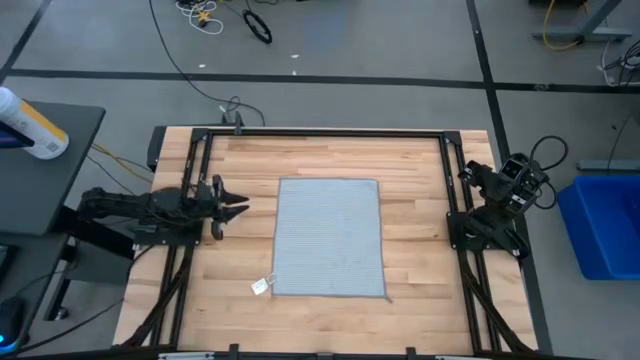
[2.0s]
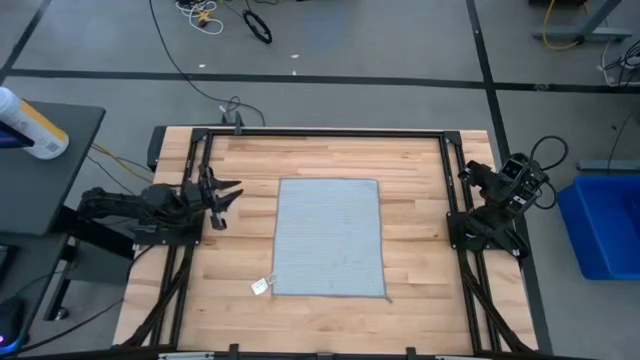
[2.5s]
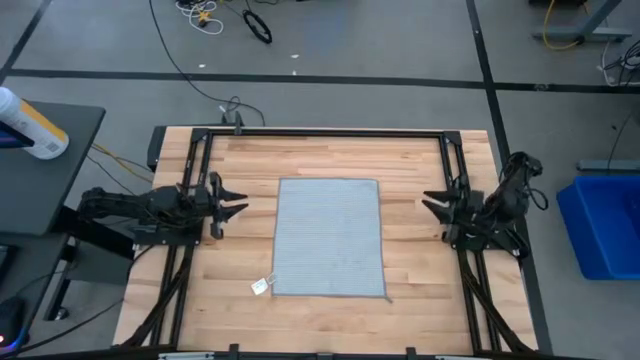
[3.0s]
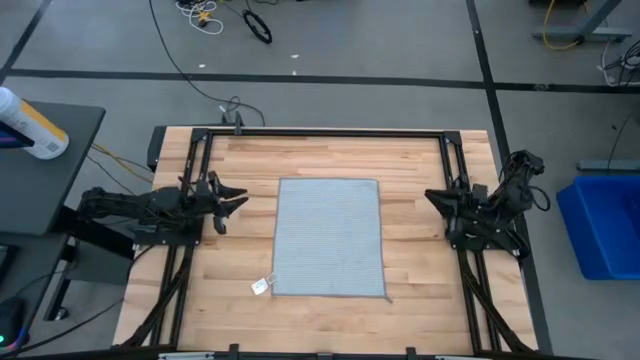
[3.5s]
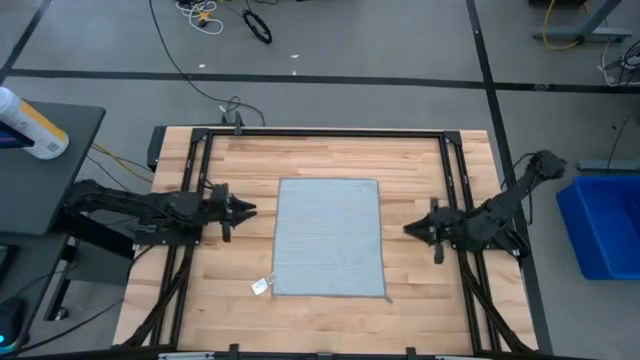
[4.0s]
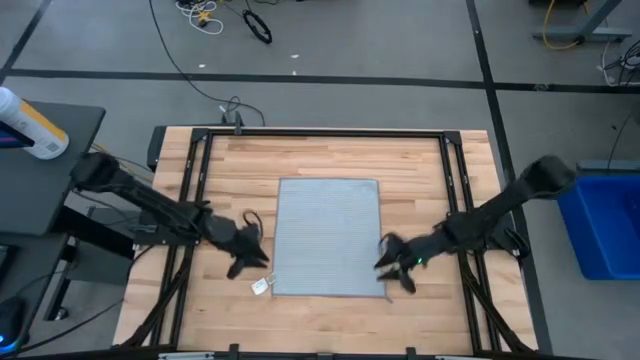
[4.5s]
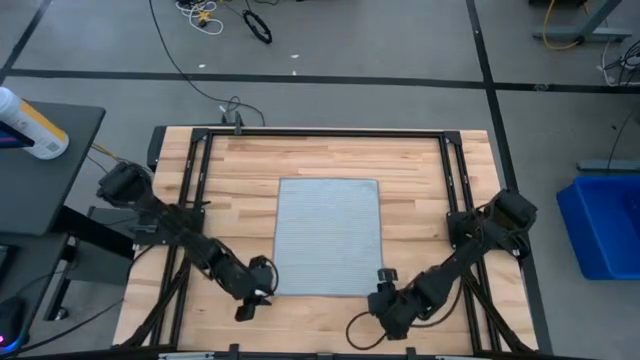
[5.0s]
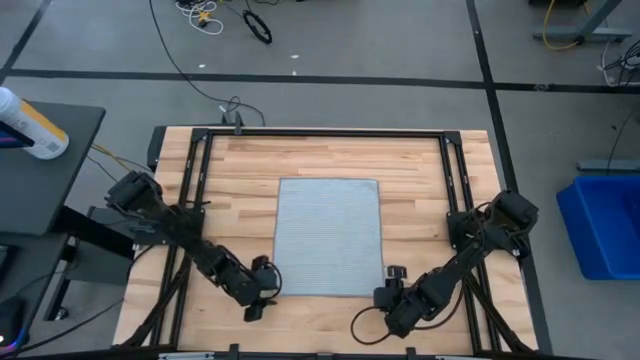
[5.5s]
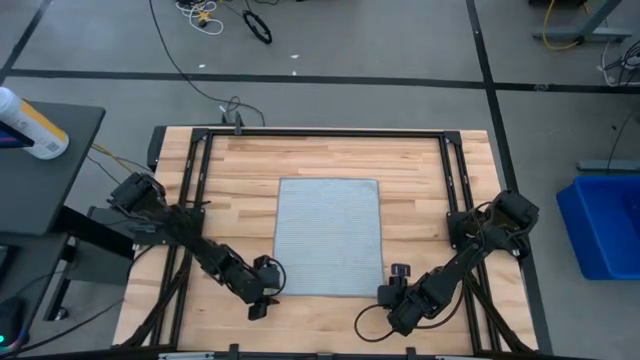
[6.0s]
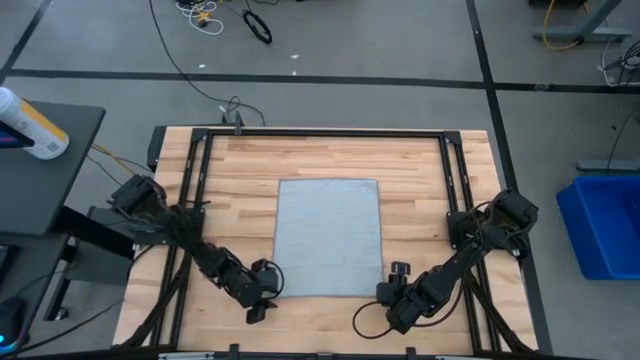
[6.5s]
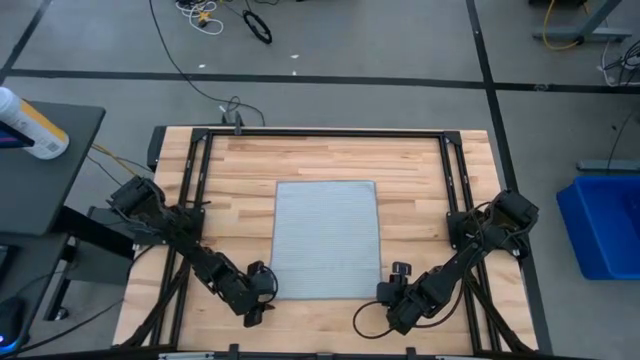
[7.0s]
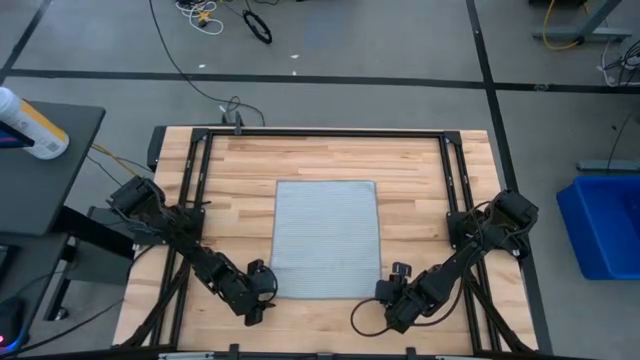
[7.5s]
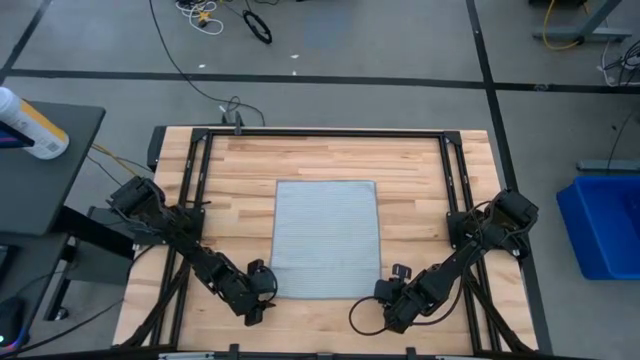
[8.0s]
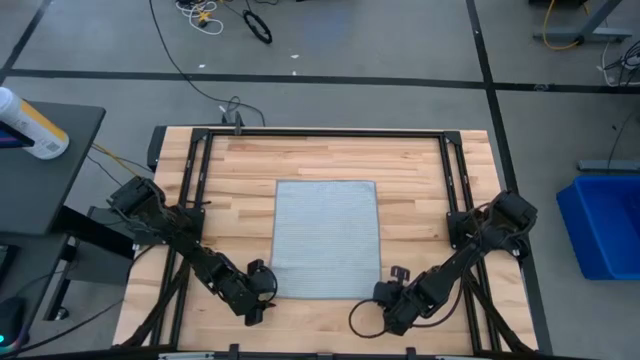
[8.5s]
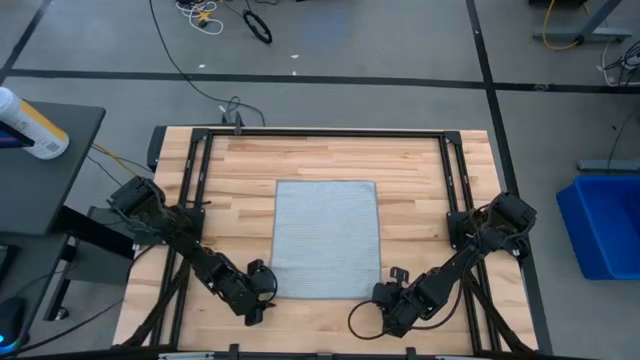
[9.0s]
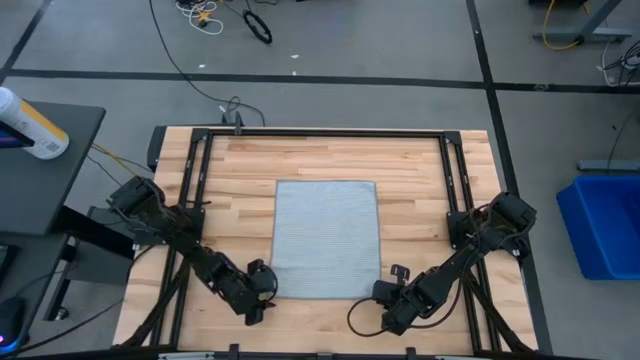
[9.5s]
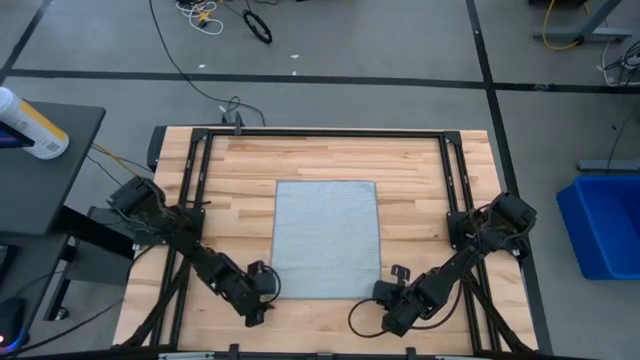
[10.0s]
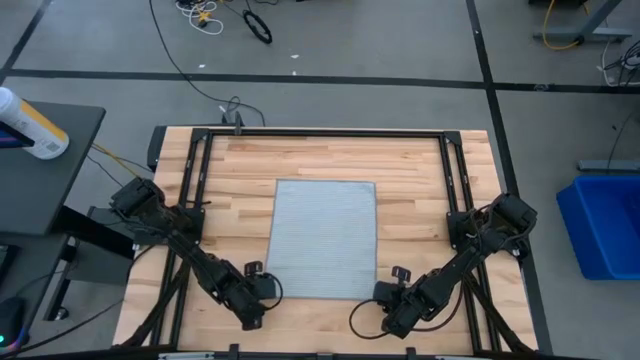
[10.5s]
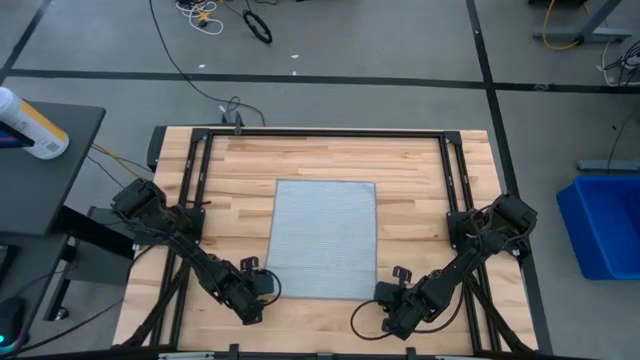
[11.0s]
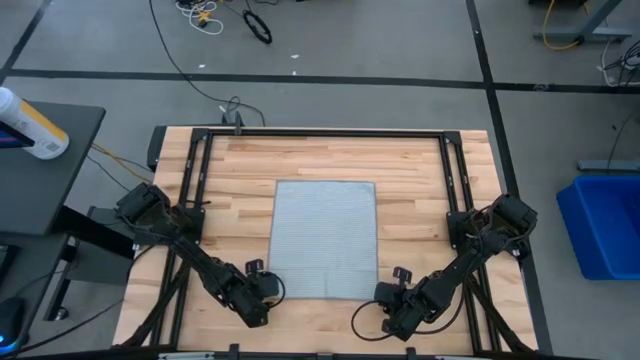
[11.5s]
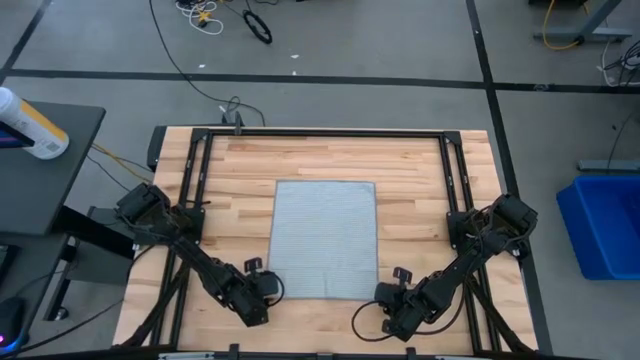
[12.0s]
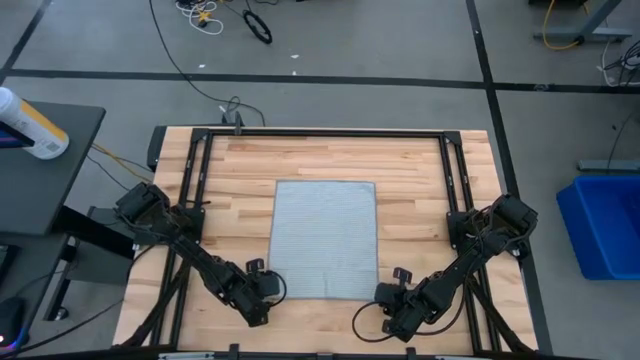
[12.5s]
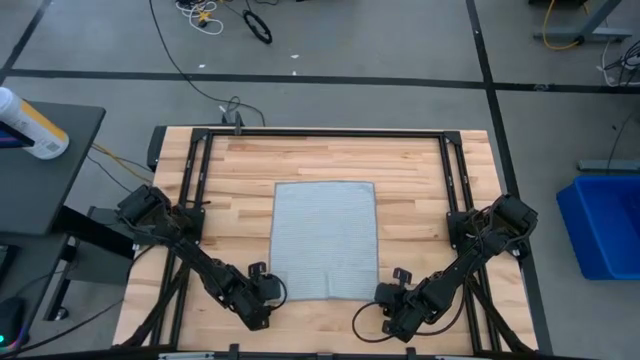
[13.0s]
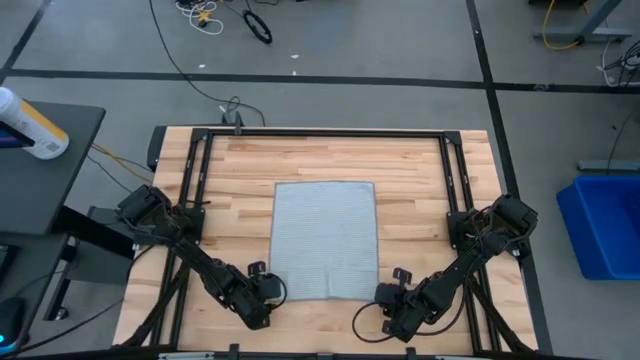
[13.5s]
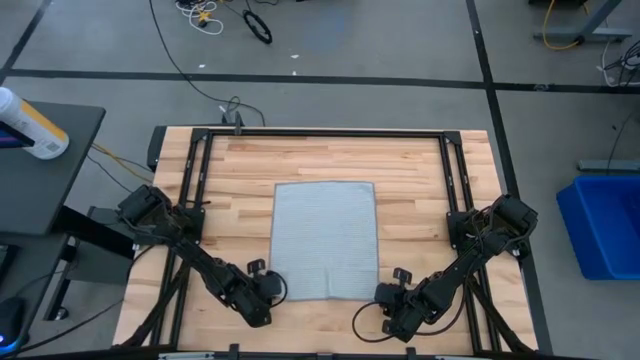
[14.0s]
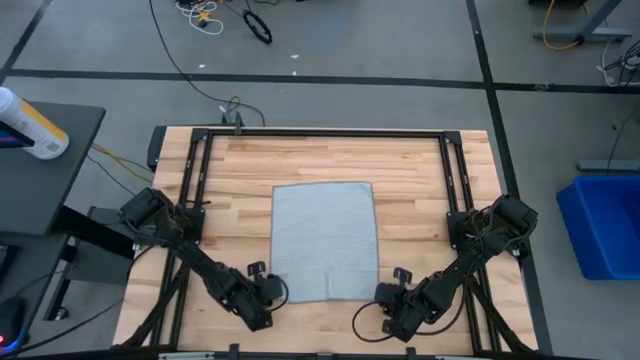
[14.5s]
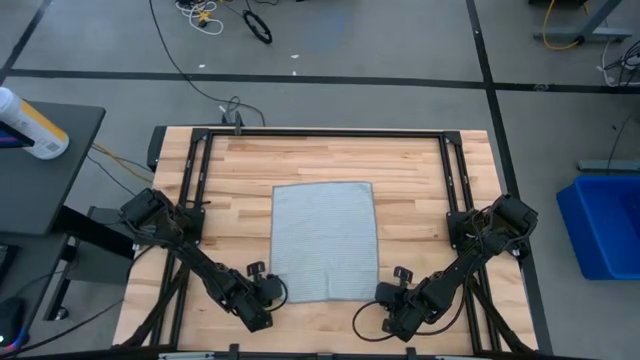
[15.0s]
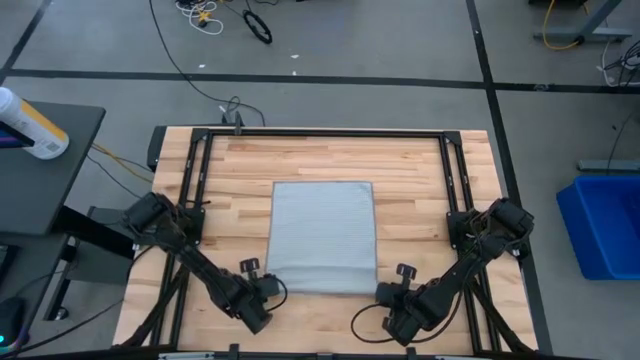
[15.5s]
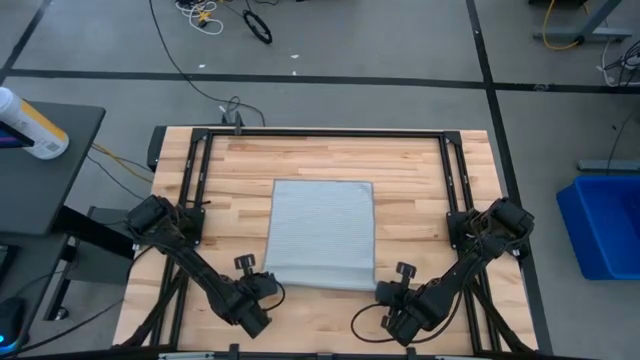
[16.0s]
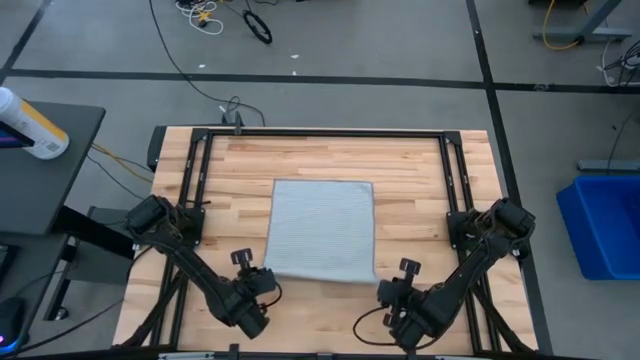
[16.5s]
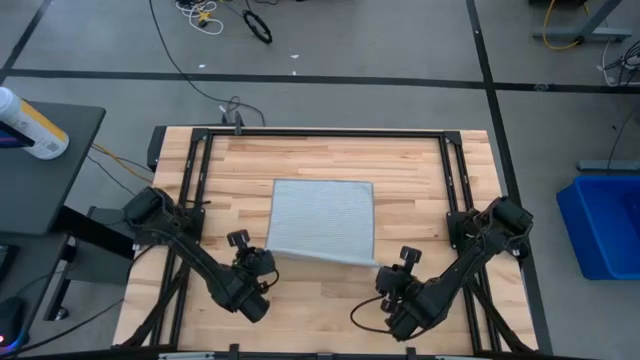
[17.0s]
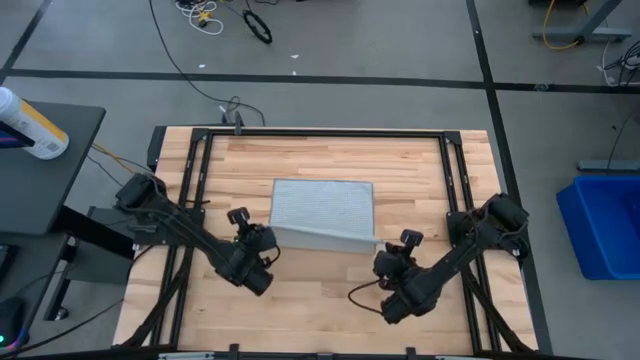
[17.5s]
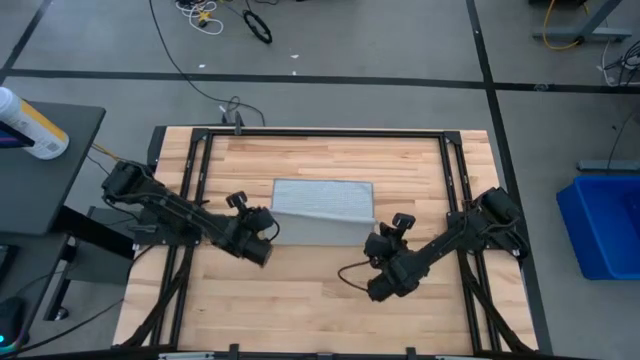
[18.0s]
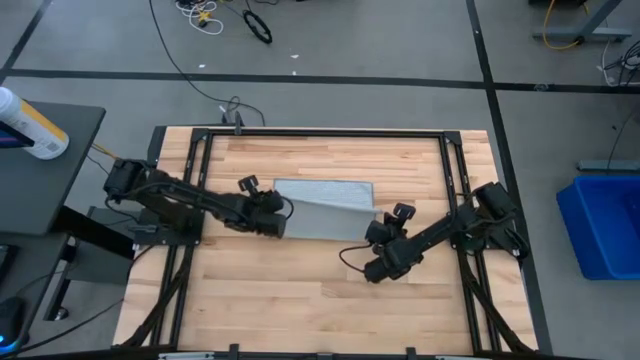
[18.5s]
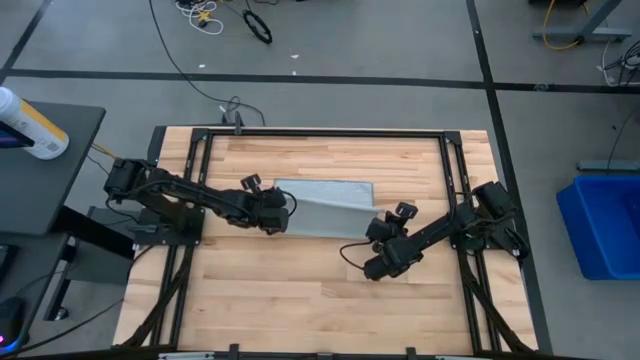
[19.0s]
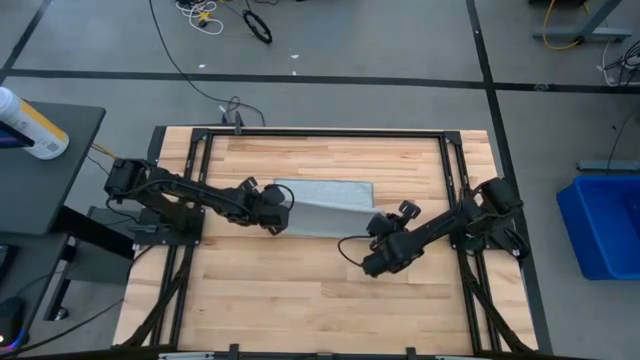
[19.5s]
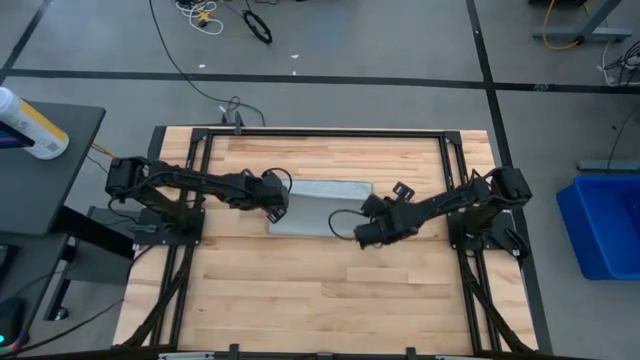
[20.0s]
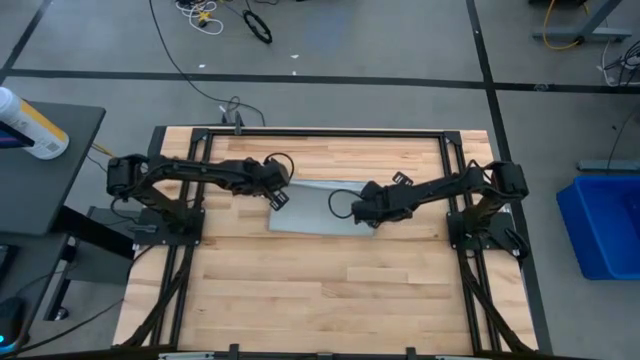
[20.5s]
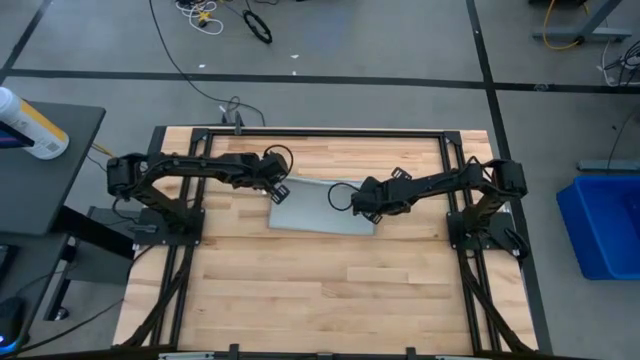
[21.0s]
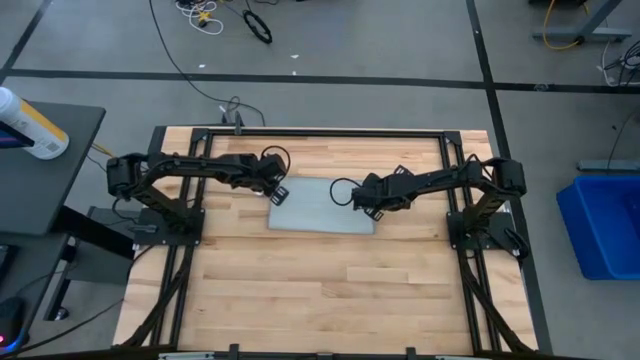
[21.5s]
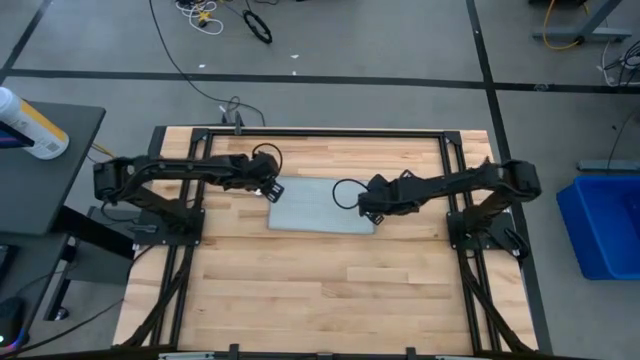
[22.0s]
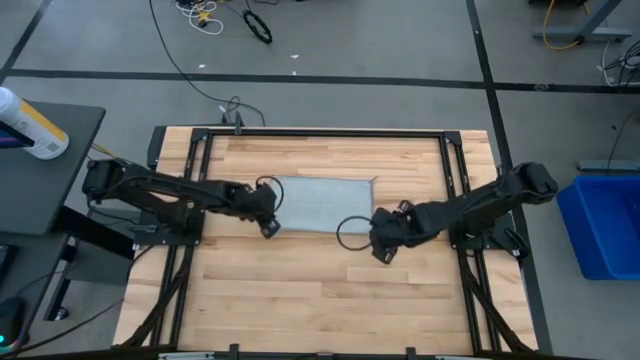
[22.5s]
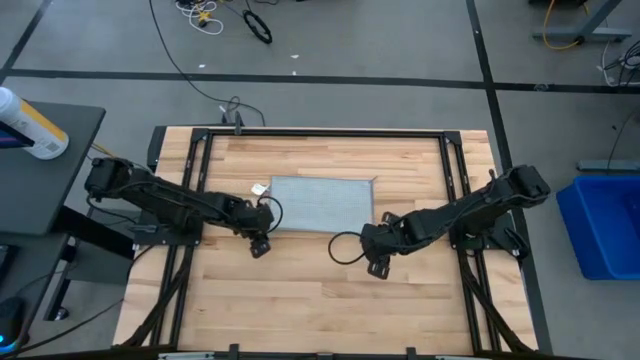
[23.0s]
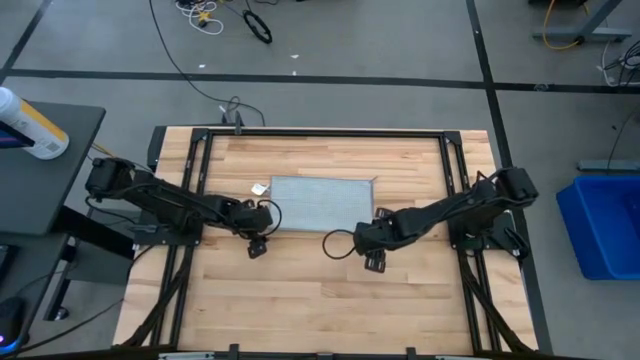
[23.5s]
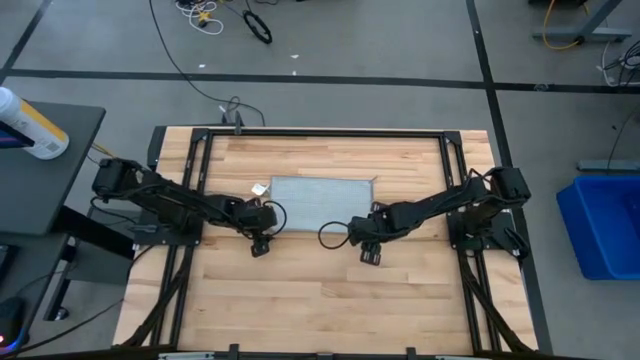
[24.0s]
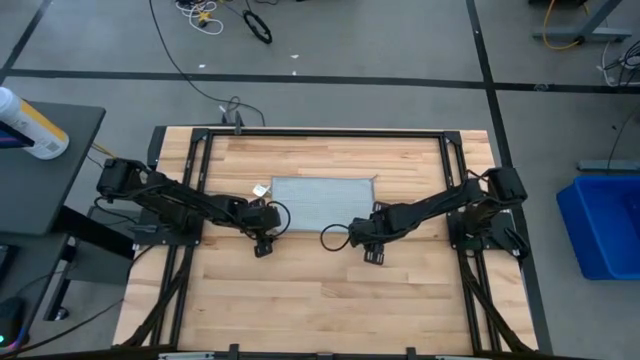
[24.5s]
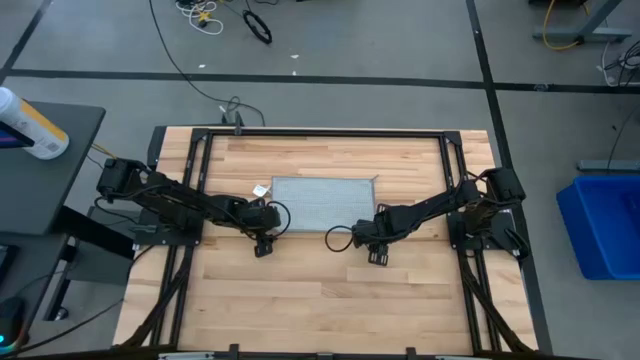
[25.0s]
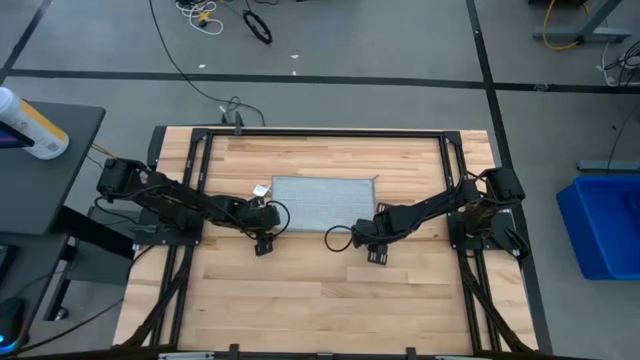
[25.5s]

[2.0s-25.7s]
Task: Fold microfiber towels
Fold the gray towel
